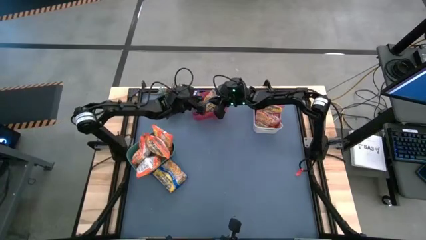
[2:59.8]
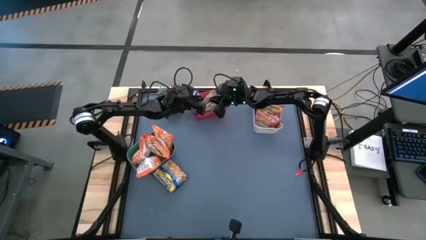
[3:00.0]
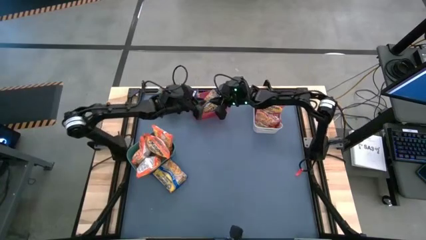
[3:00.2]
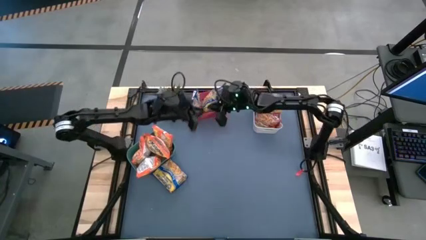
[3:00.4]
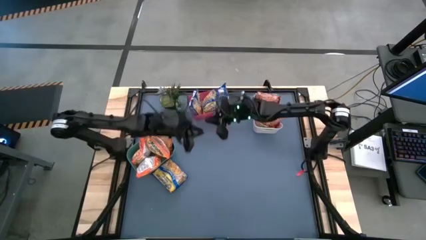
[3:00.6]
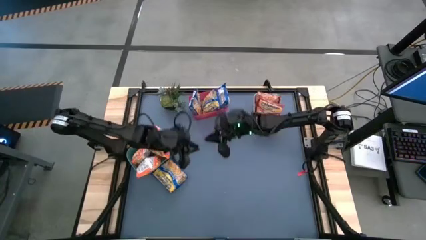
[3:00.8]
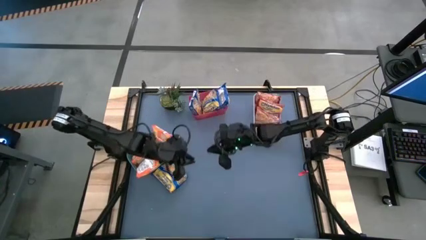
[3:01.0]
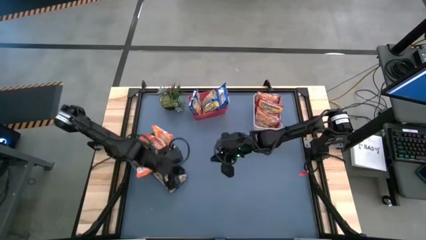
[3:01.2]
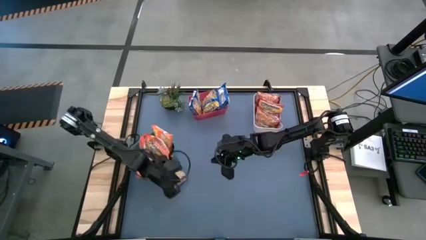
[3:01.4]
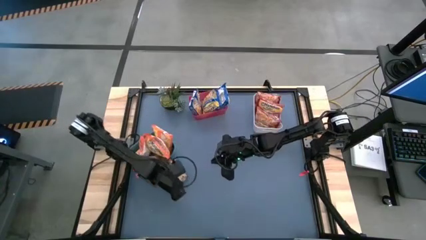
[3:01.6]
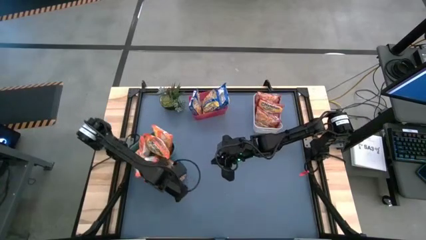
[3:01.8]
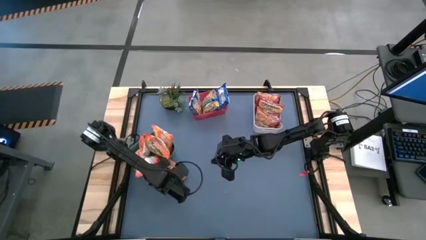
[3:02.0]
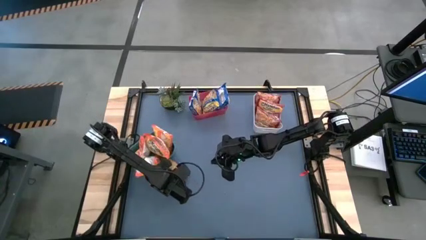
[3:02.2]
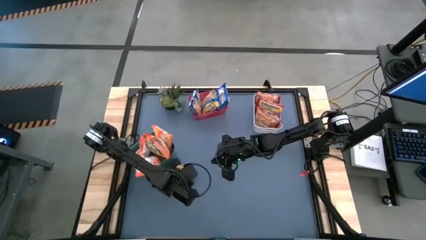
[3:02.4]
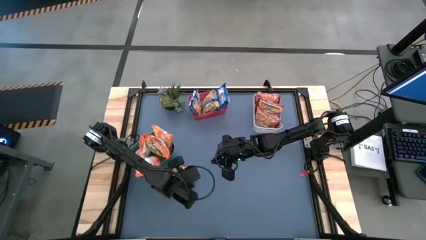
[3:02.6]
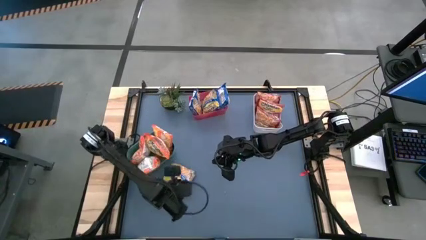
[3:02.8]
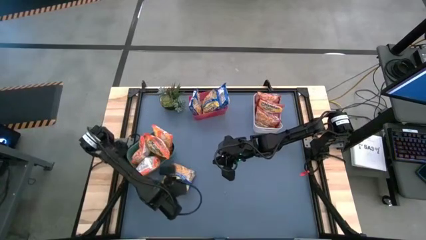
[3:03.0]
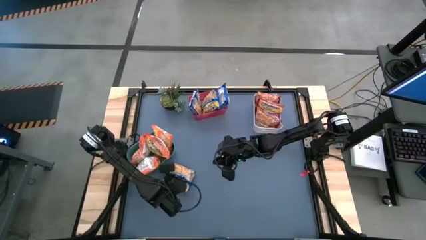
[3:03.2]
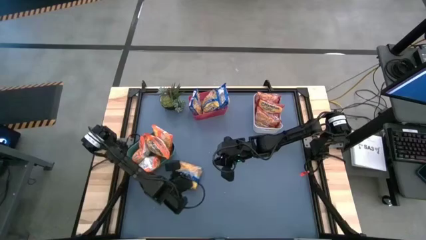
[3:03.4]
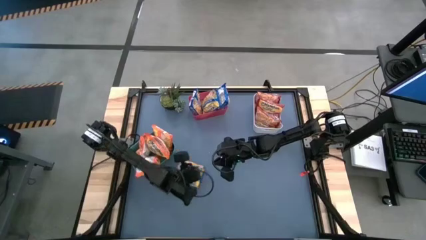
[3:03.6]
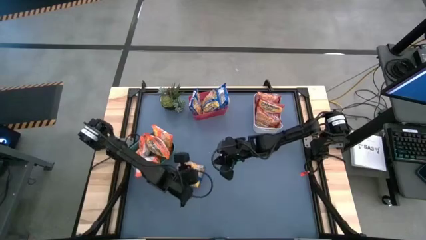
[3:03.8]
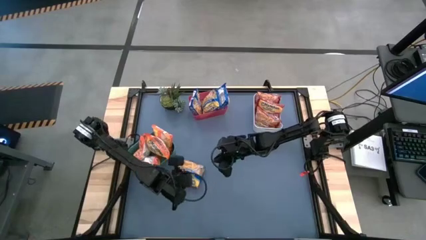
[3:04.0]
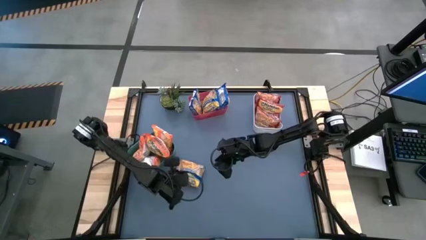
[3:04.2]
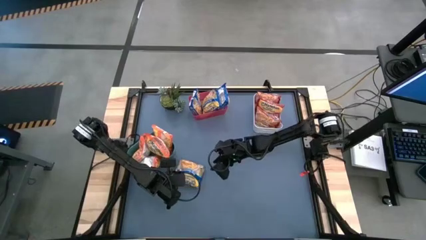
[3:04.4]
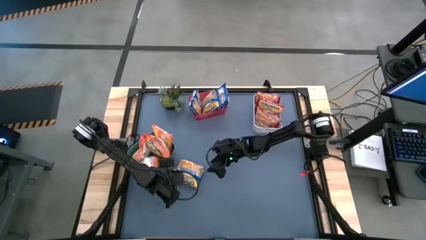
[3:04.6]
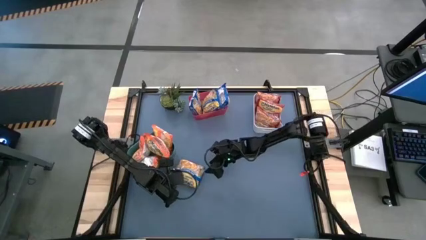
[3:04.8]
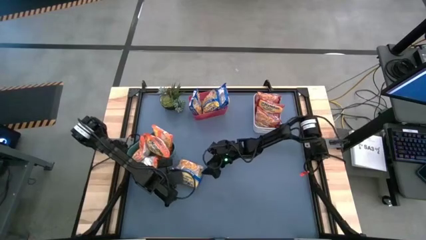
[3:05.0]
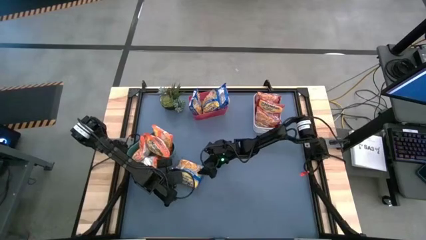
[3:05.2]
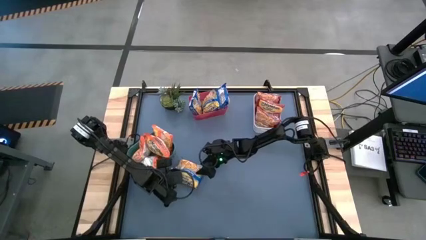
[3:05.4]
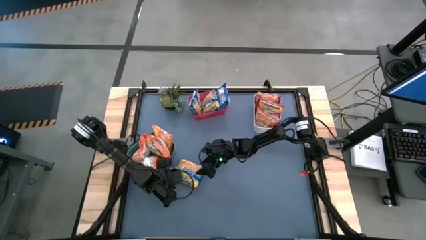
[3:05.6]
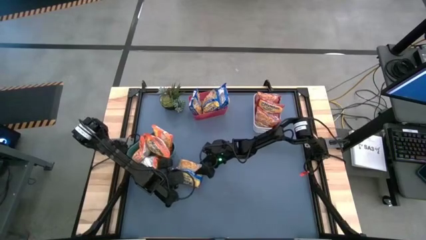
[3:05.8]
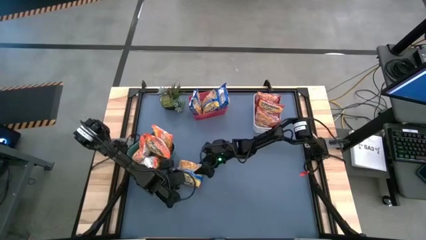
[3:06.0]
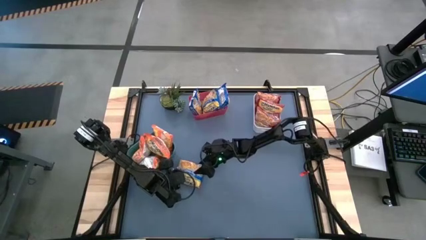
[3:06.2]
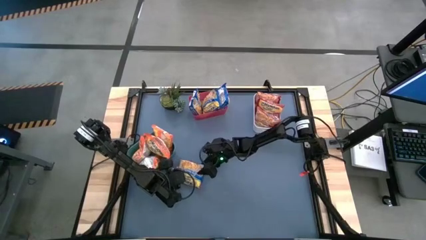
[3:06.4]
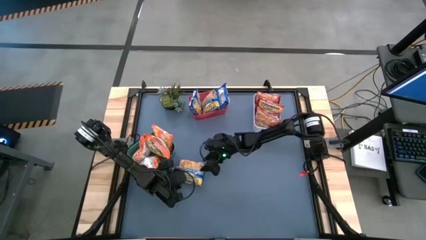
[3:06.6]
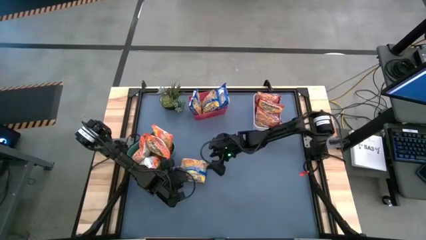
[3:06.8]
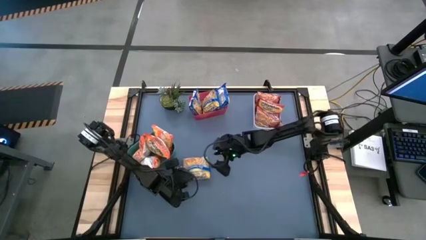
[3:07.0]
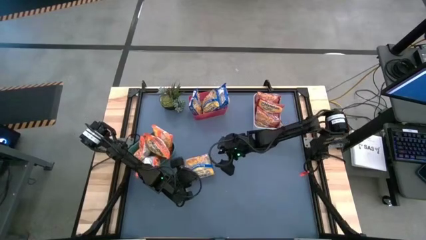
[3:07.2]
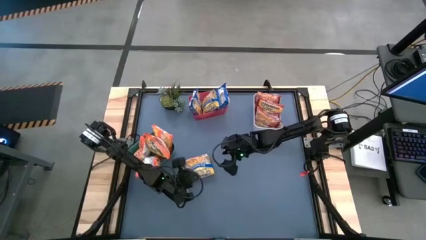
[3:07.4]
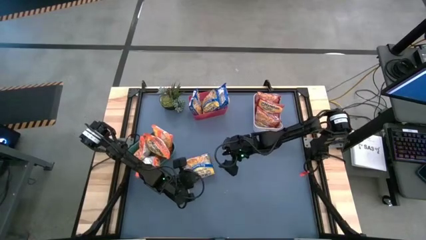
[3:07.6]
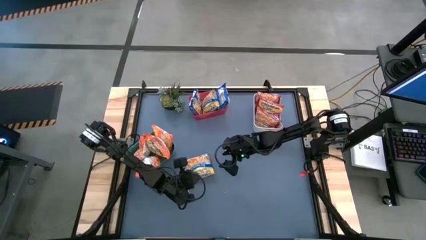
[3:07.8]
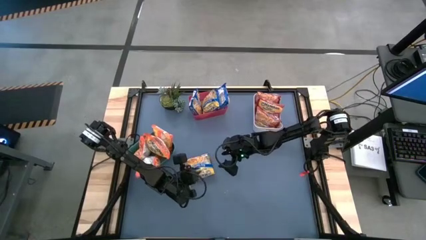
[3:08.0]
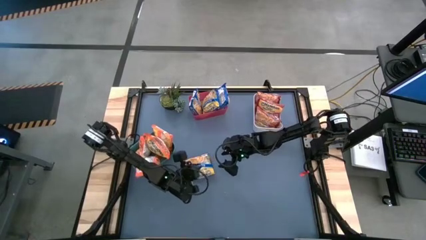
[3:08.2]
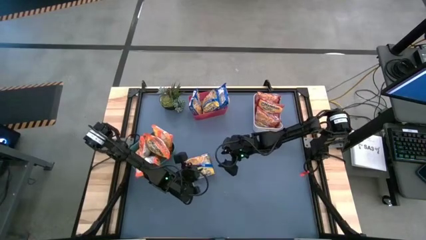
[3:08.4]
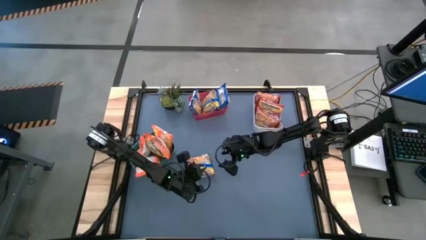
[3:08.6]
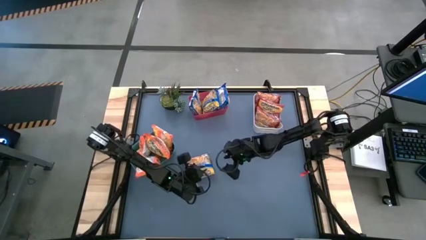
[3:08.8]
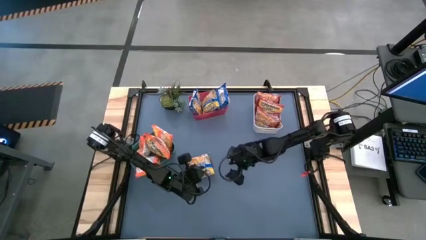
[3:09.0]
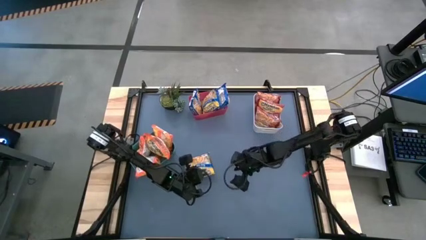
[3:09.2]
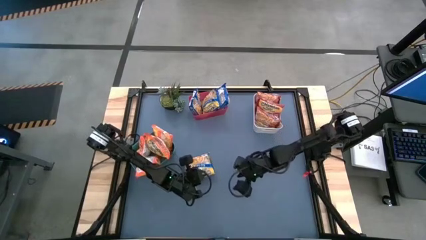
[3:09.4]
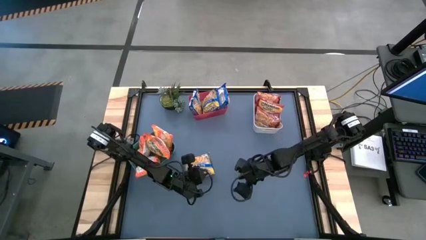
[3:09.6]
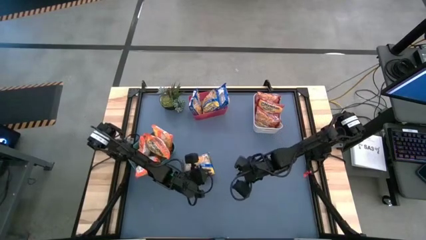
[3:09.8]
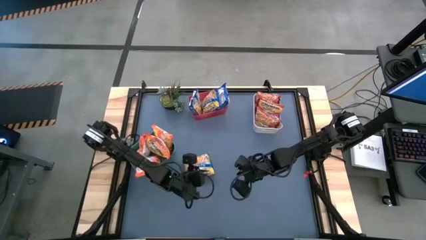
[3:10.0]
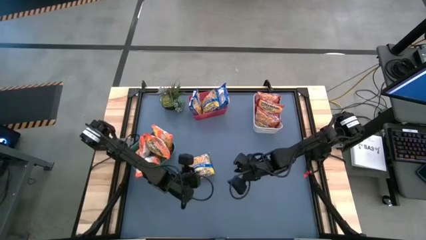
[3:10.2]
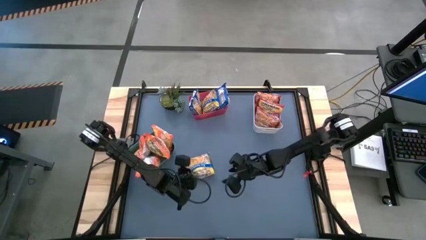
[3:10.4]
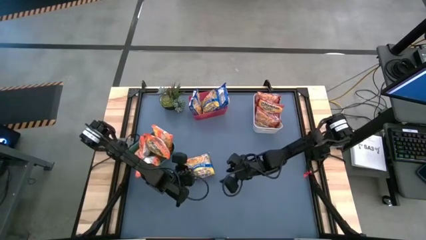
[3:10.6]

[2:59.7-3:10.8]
Task: Sort Maruchan noodles
Put the blue noodle pack into the red bin

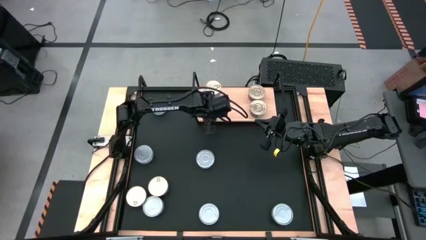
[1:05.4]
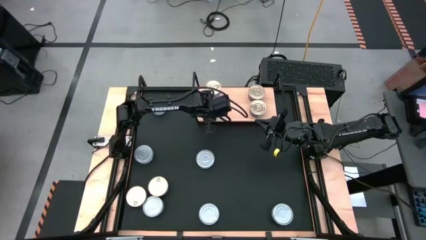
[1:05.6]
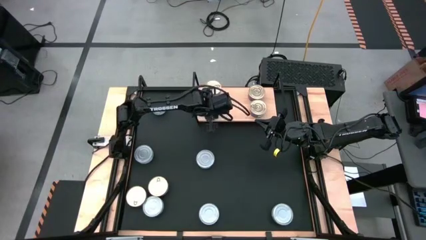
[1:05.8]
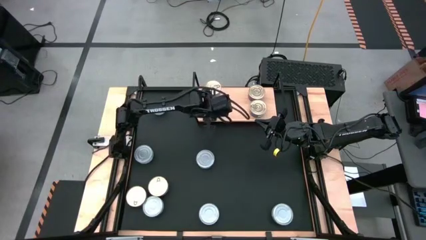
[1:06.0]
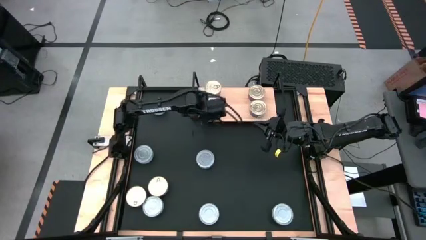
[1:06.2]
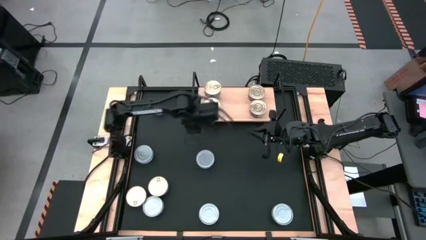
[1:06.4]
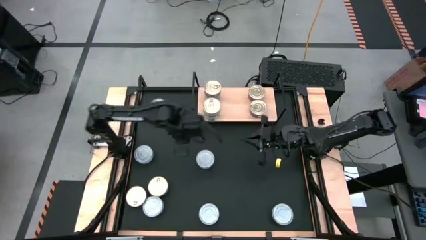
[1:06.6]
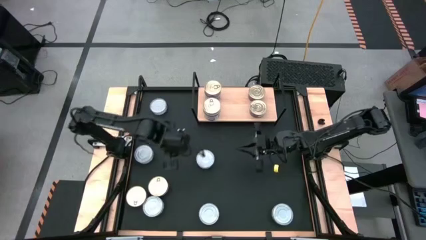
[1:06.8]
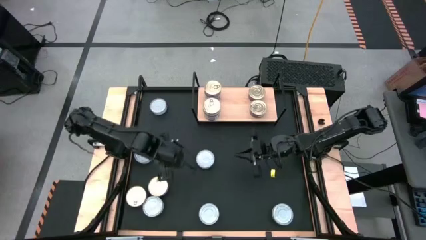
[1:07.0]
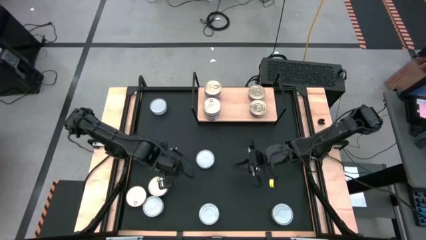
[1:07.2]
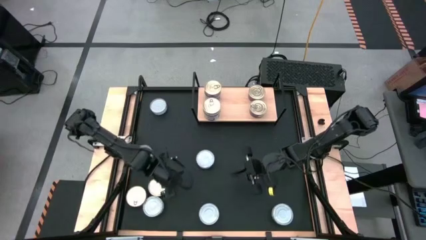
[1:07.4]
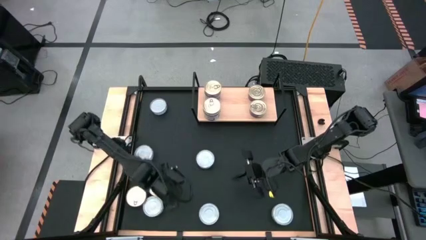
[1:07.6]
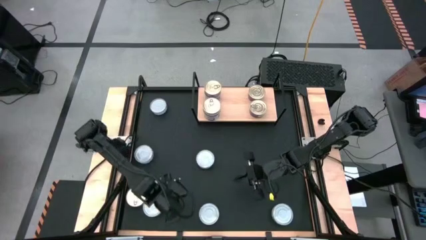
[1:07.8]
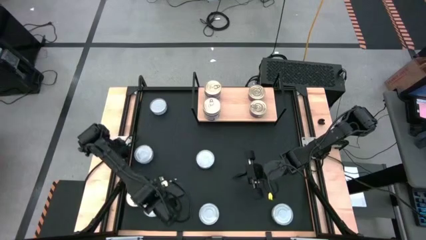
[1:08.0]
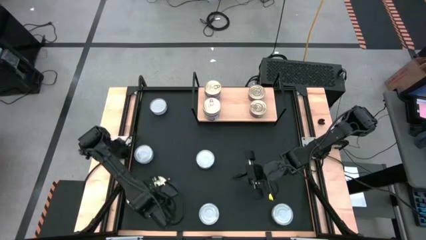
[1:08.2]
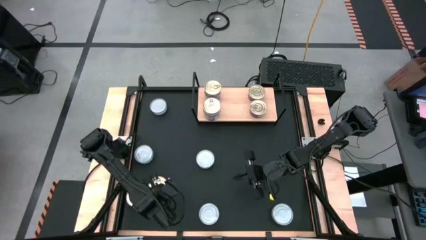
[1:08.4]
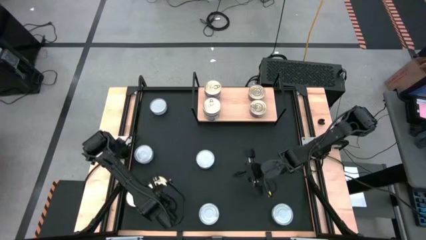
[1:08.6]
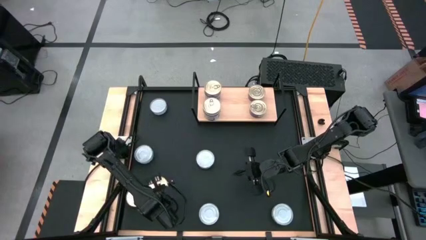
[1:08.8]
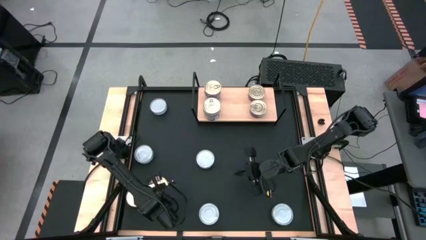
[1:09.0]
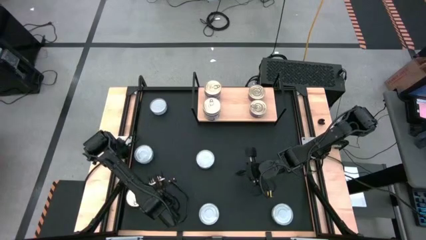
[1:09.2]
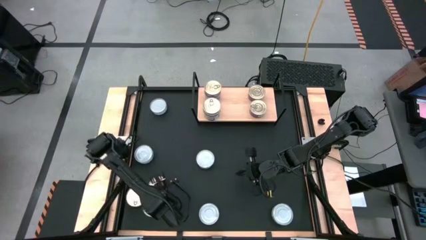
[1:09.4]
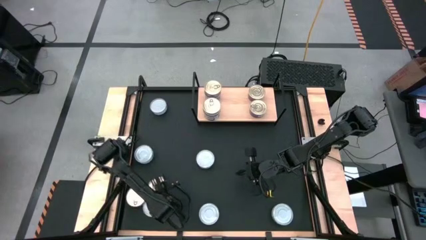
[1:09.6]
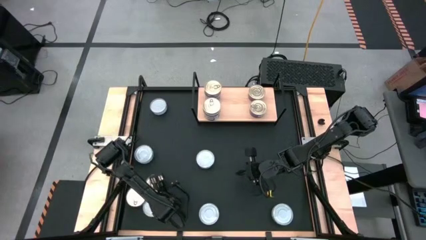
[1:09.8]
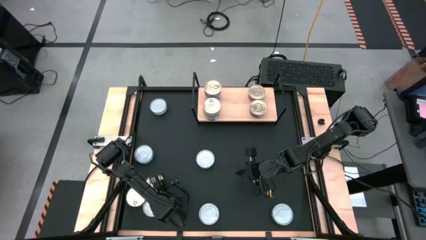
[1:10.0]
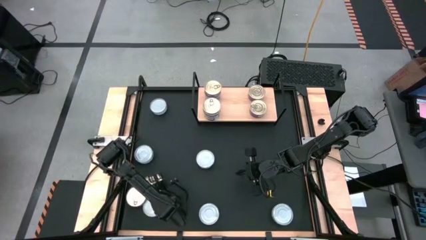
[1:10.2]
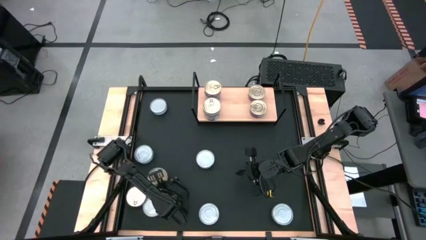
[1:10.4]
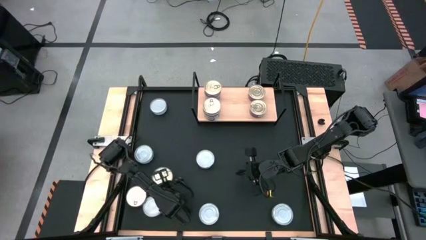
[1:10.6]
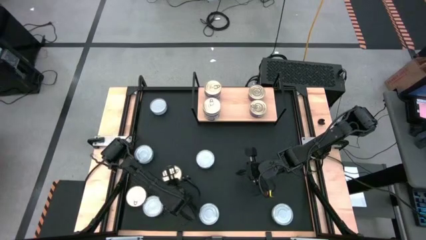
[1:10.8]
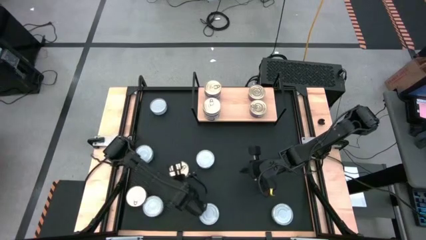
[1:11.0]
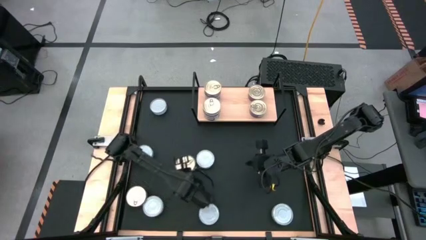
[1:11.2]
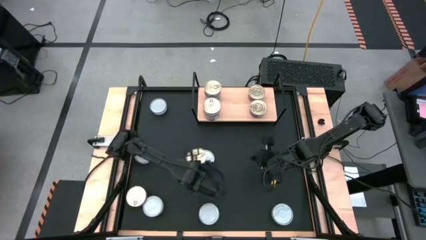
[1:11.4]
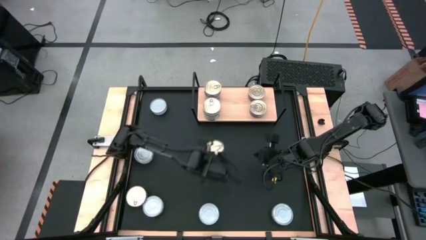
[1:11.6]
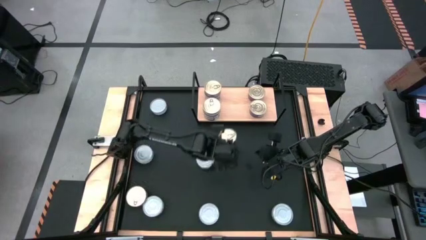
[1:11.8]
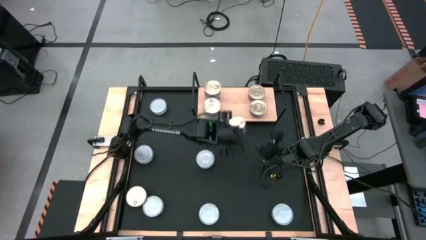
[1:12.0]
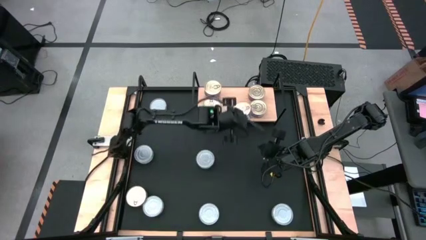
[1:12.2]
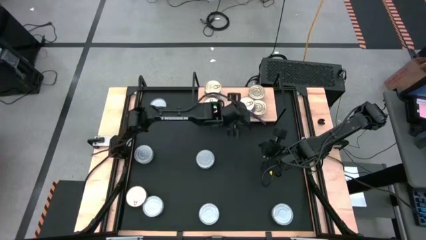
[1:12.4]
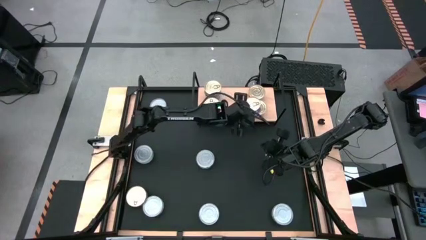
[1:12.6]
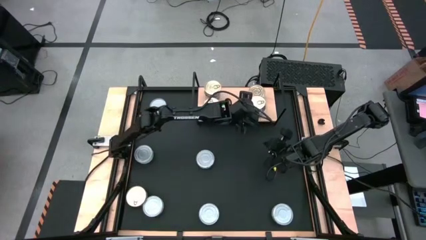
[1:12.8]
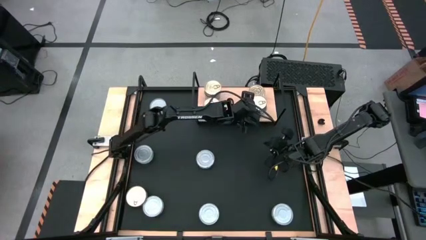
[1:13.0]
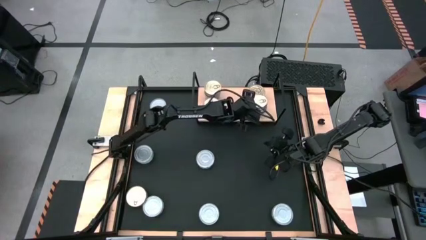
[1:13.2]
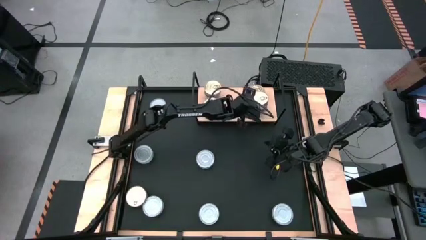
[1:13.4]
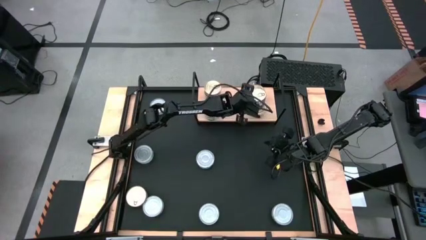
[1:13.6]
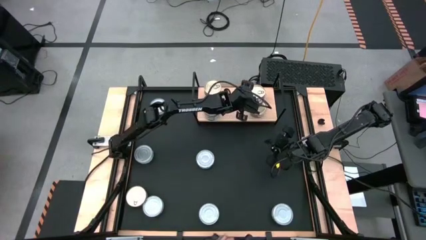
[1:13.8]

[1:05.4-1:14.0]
Task: Stack canned seafood by type on shelf
Stack the blue pink tuna can on top of the other blue pink tuna can on the shelf
